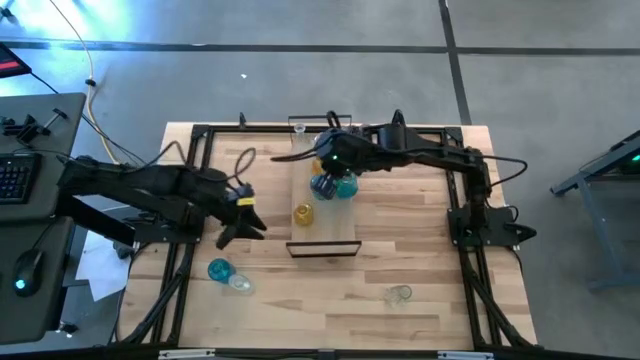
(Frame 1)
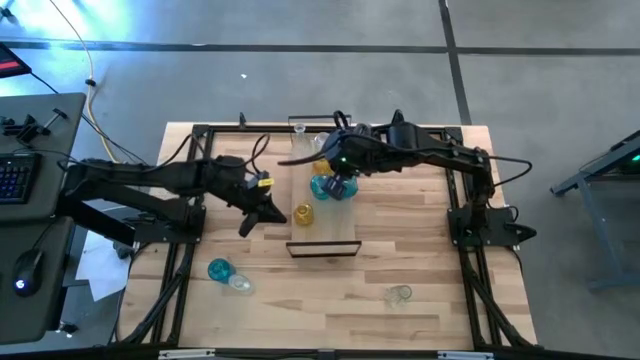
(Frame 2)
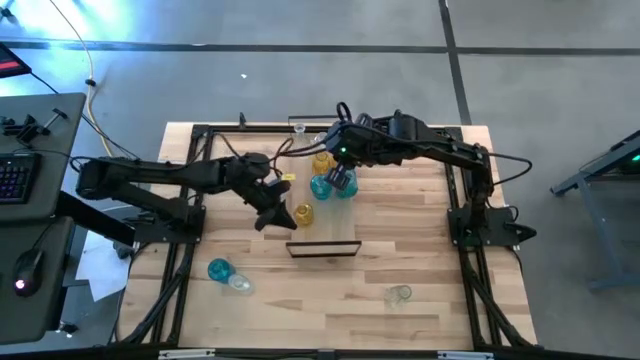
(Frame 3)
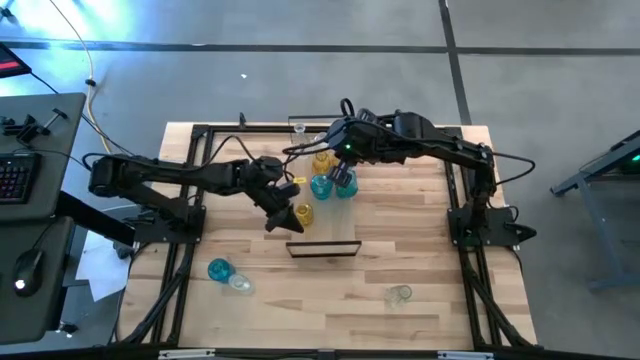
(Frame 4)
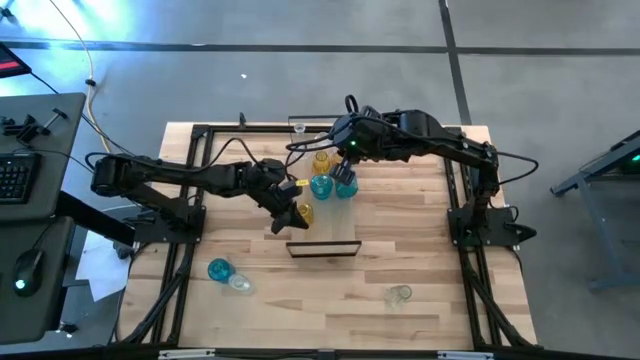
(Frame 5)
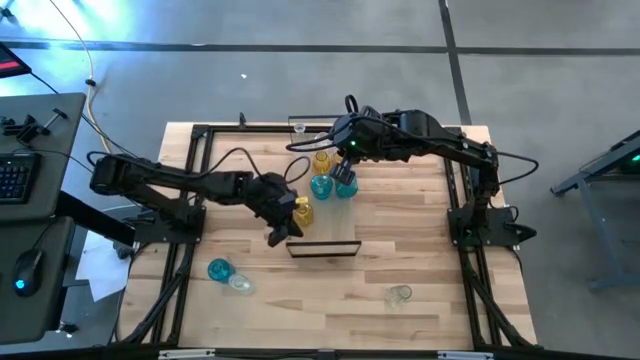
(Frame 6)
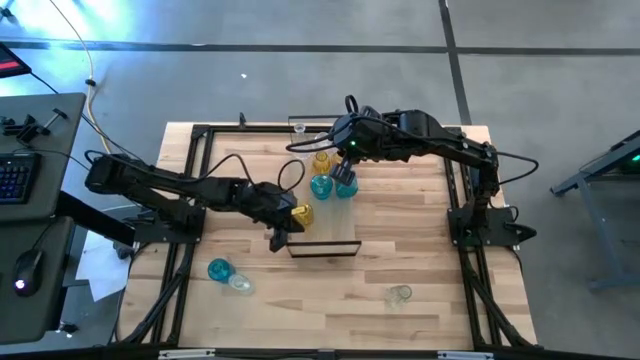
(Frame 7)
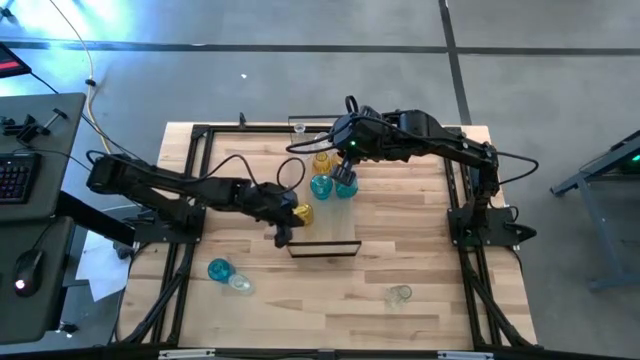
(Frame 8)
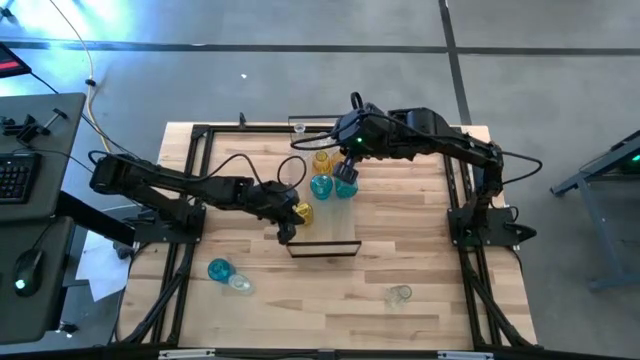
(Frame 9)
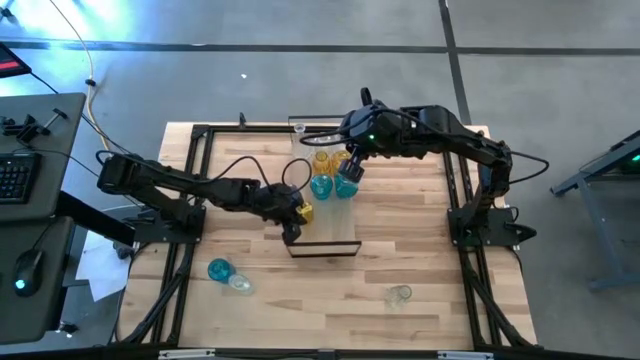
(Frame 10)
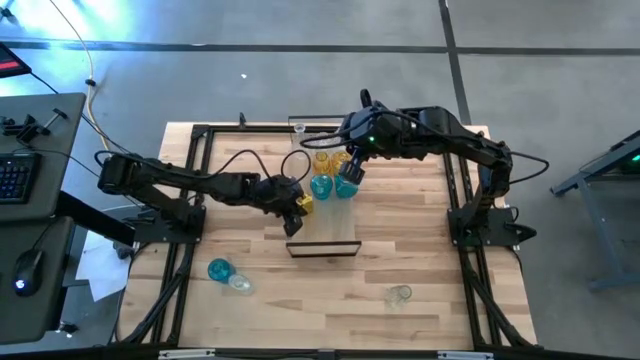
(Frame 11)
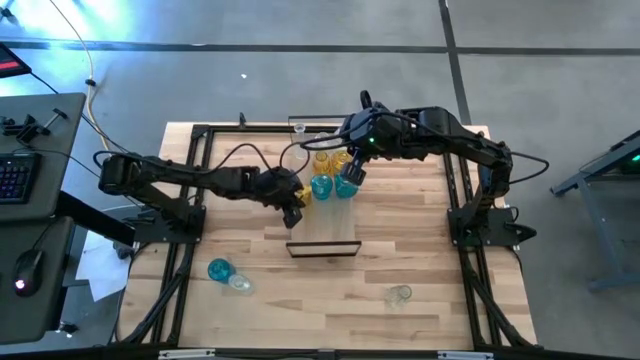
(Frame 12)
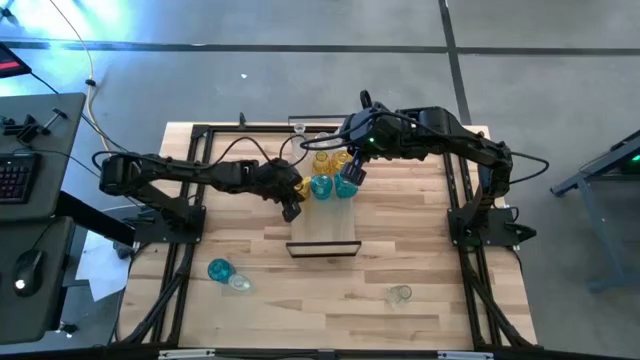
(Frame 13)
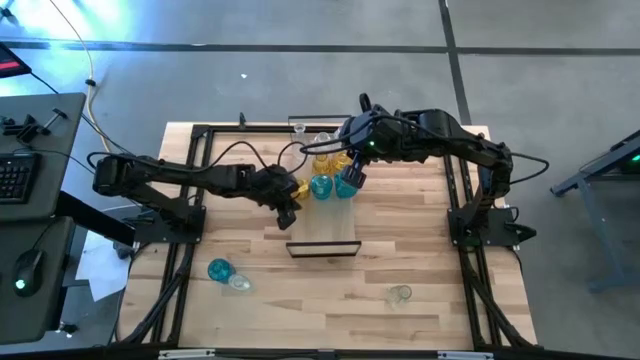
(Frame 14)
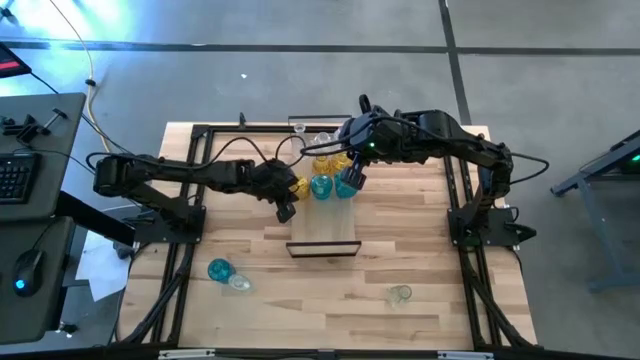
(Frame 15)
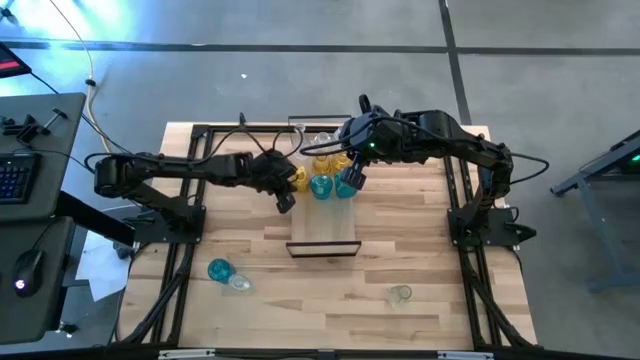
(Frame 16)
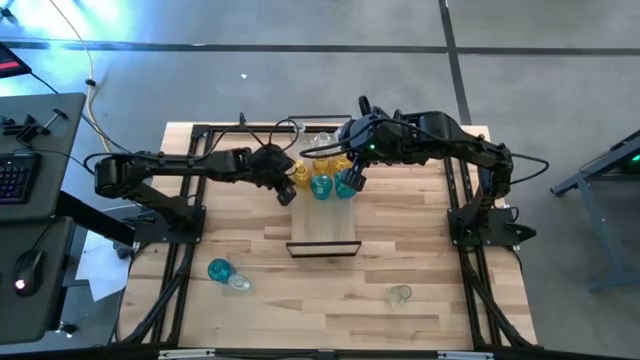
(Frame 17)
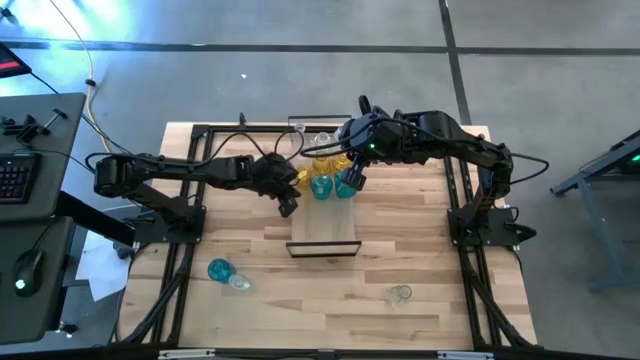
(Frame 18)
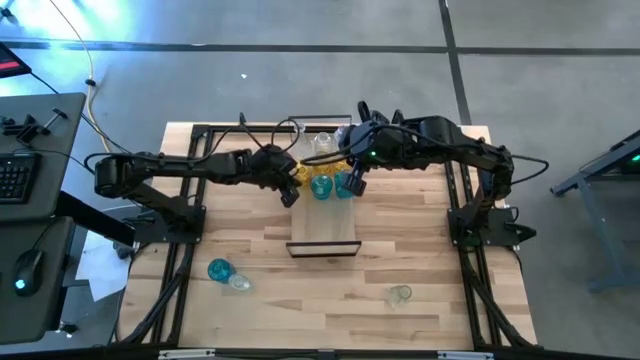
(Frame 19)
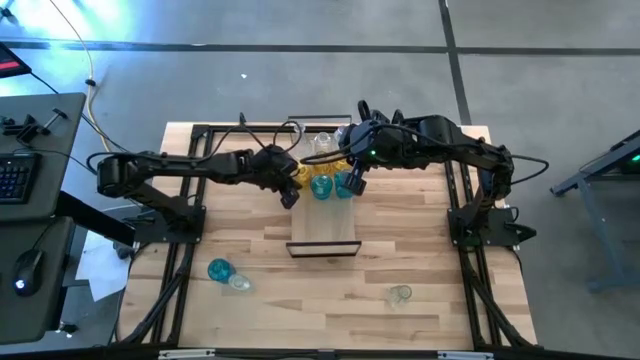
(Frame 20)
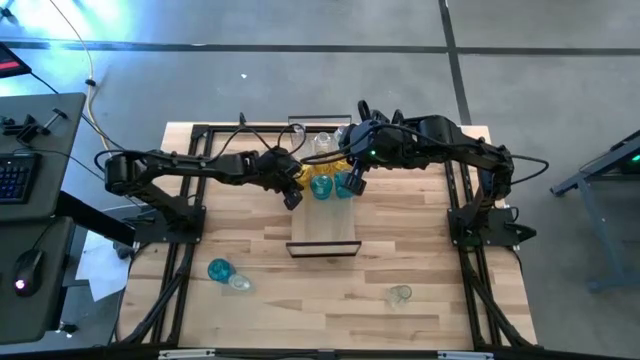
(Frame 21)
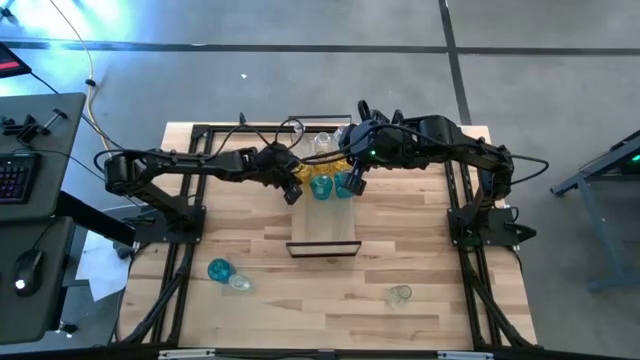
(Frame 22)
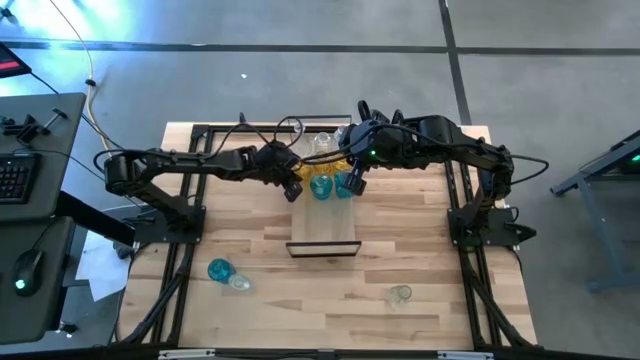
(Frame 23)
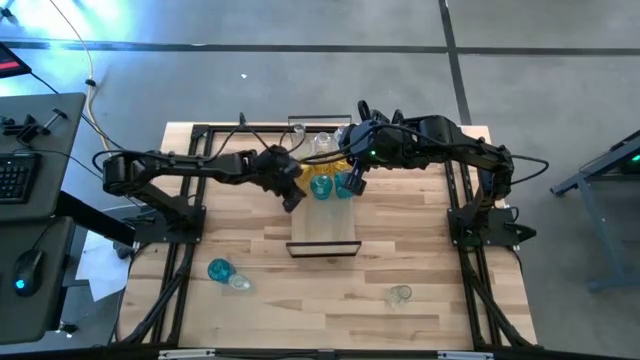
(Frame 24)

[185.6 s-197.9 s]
Task: sort vases onto shelf
Move the bottom yellow flower vase to the center of the shelf aligned with the other yellow flower vase

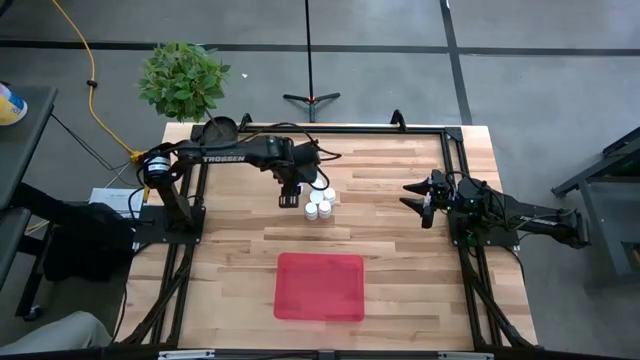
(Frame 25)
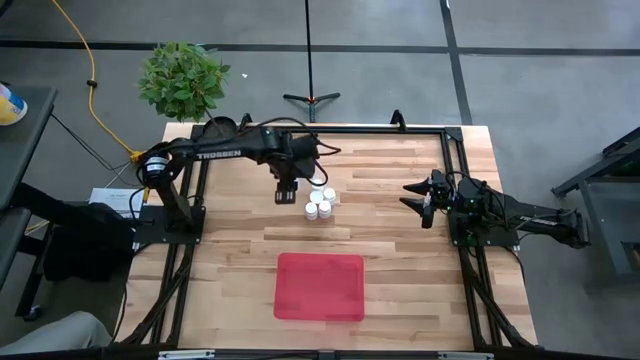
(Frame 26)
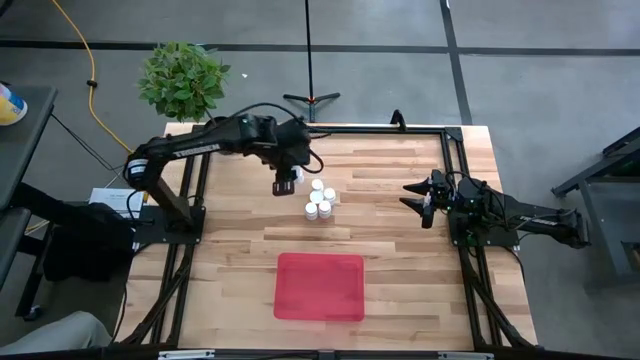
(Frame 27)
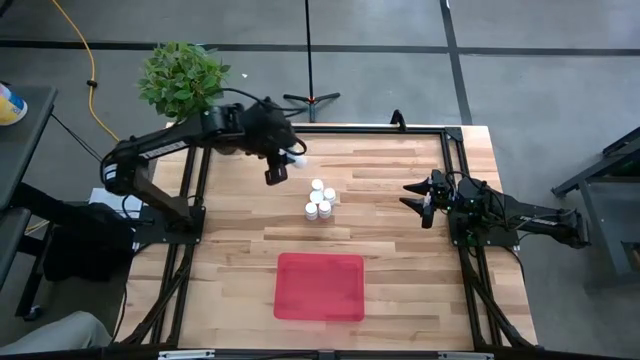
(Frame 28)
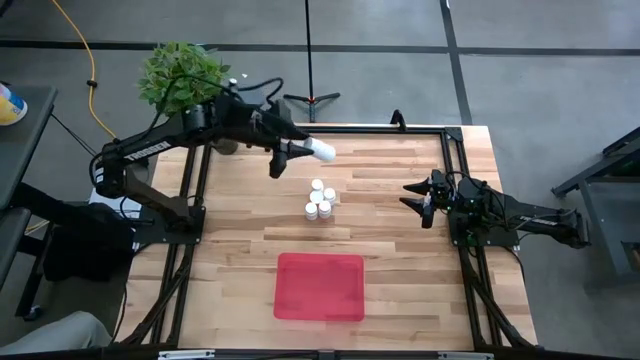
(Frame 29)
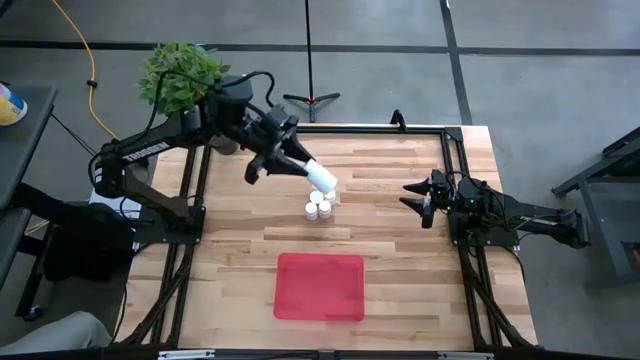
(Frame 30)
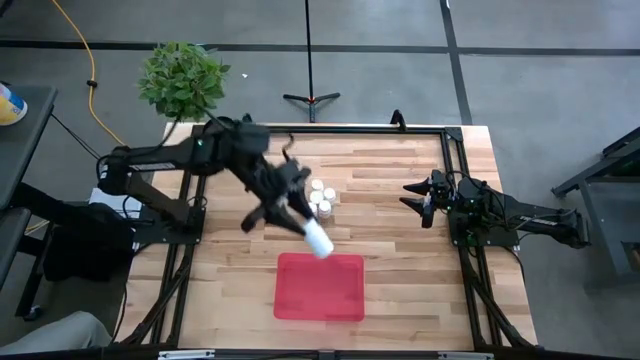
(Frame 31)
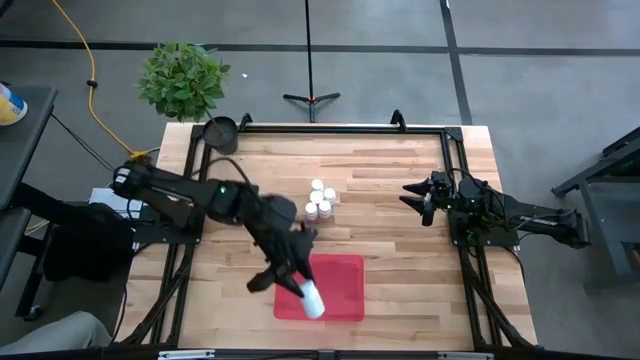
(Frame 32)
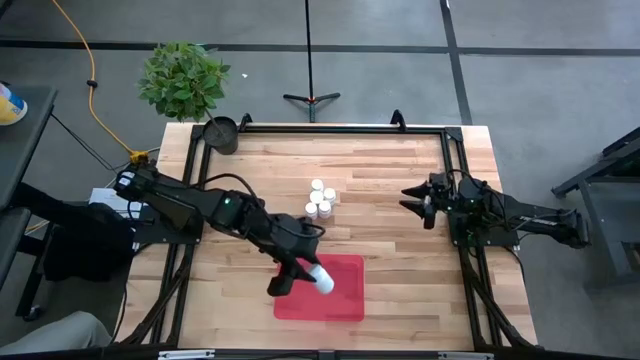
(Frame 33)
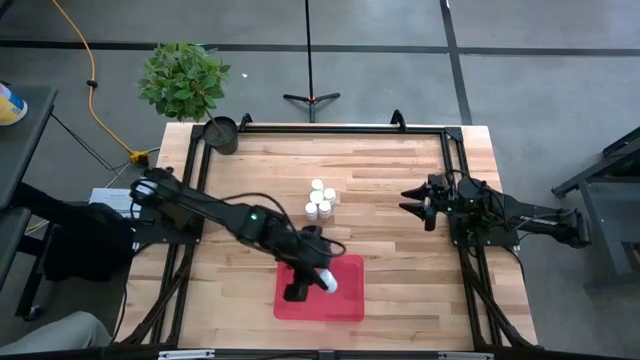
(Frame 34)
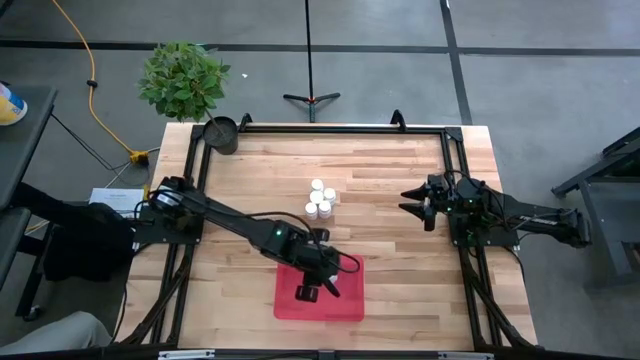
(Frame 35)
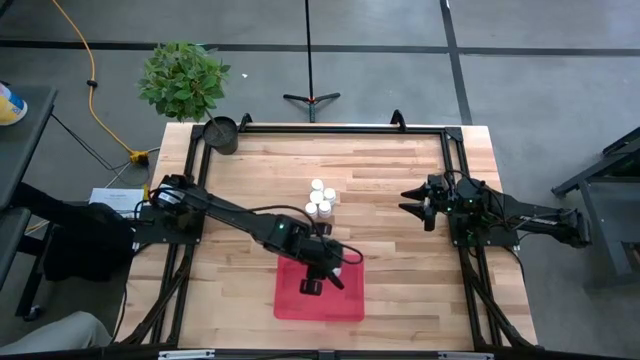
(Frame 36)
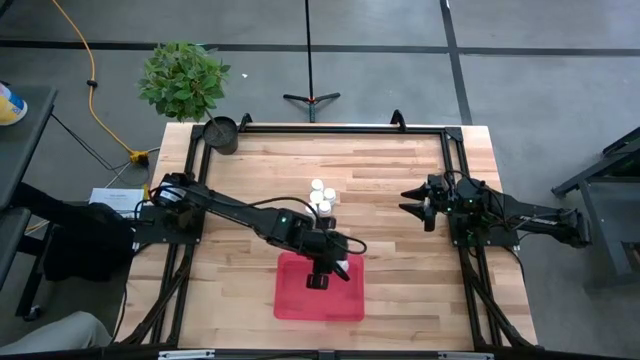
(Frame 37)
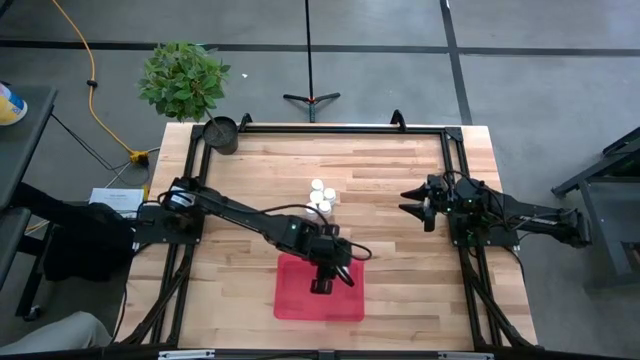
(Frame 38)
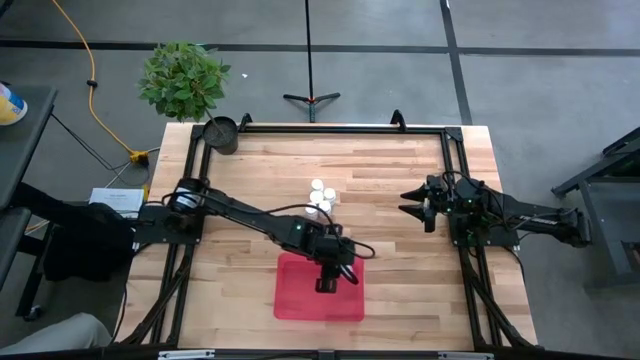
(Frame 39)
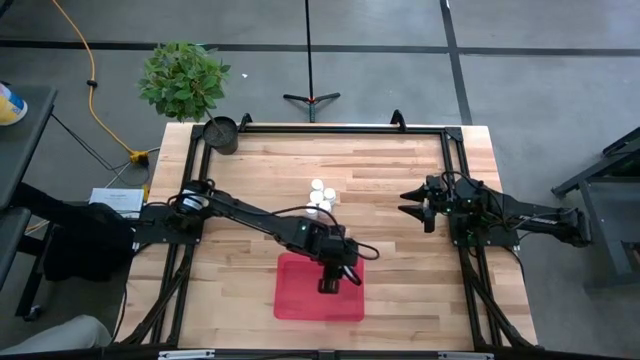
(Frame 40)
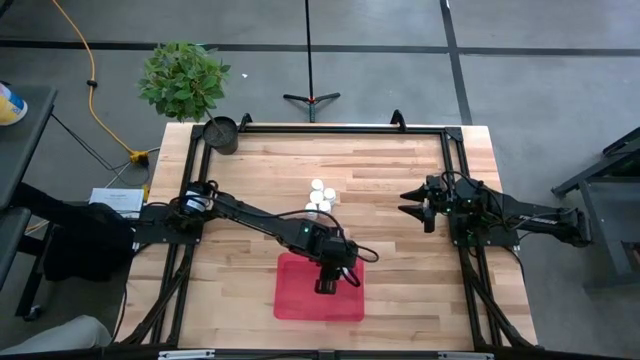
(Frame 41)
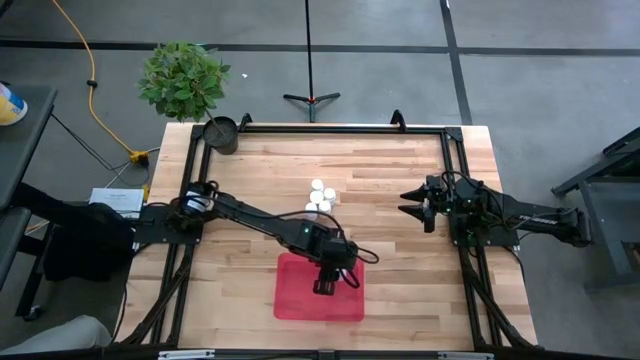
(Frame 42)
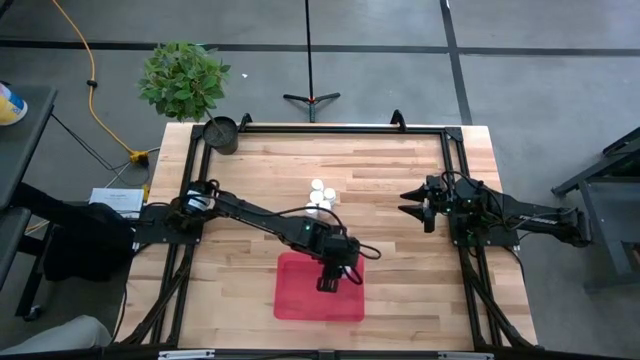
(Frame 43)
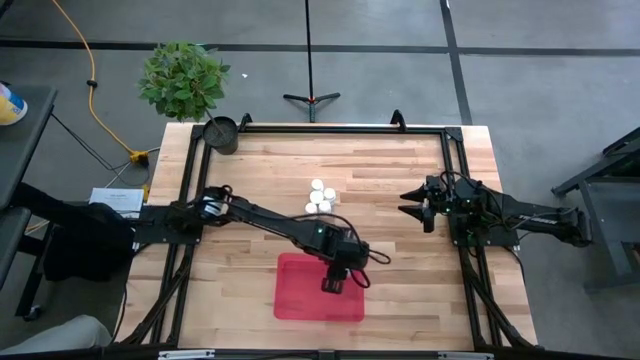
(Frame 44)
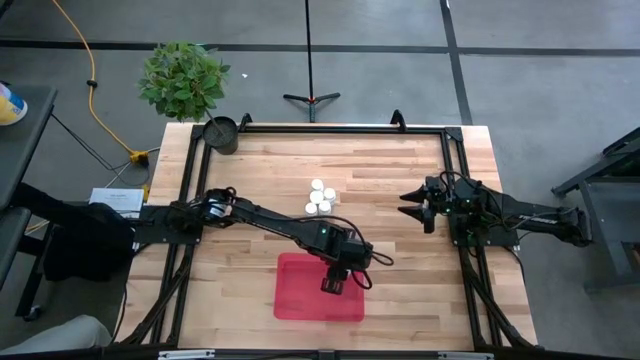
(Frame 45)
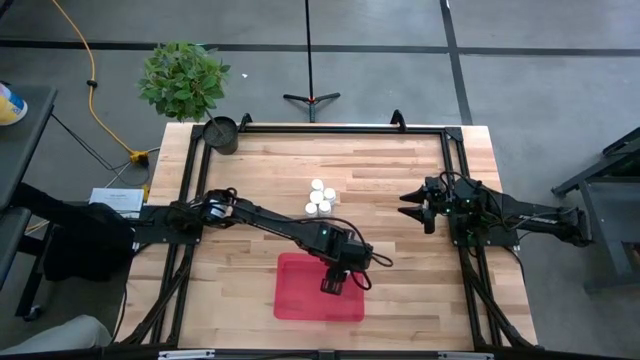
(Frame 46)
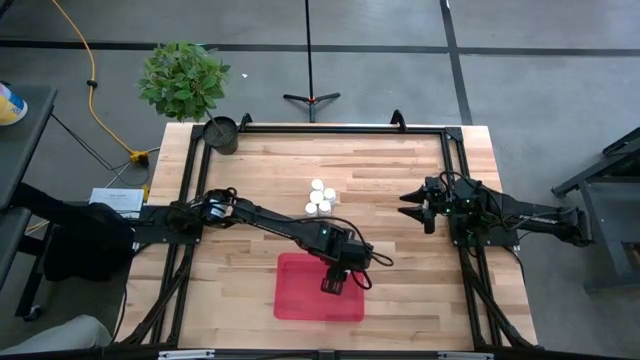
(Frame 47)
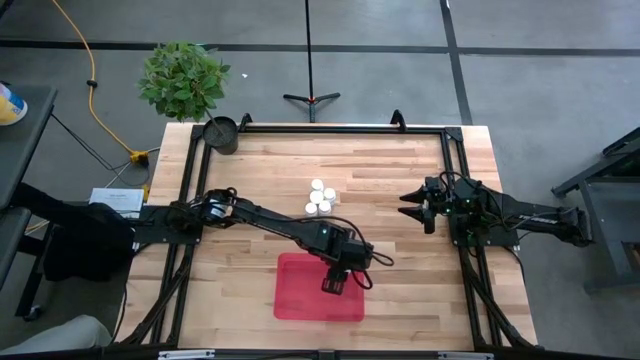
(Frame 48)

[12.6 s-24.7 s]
Task: Pick and place pill bottles into a basket
Put the white pill bottle into the red bin
